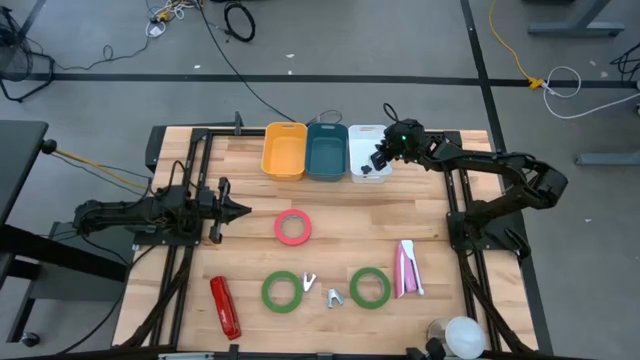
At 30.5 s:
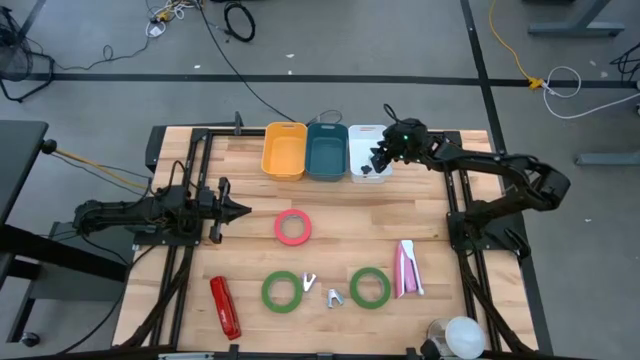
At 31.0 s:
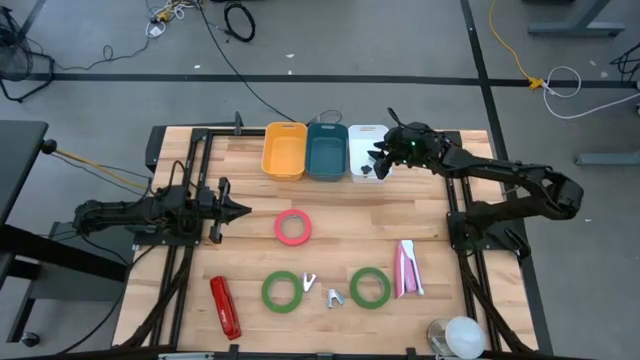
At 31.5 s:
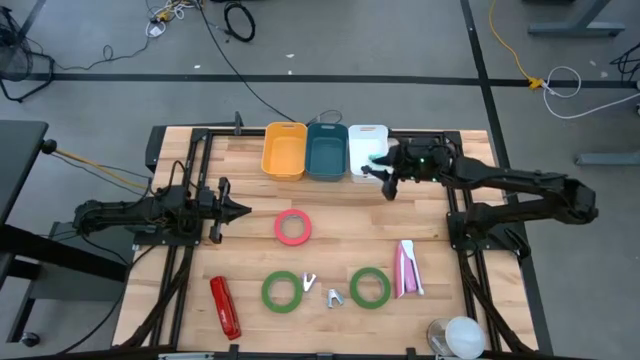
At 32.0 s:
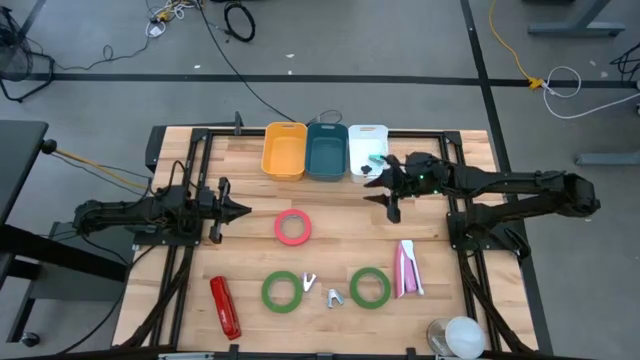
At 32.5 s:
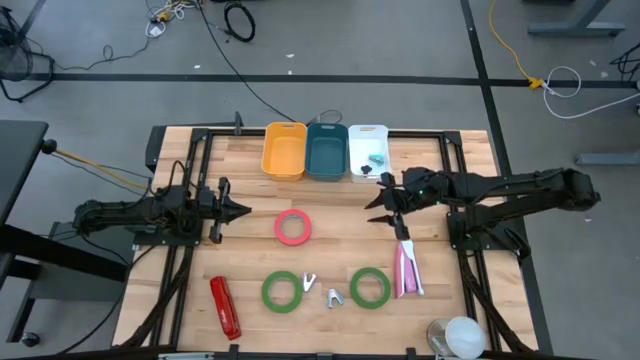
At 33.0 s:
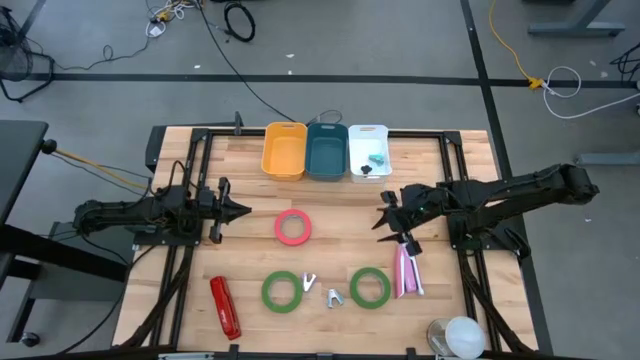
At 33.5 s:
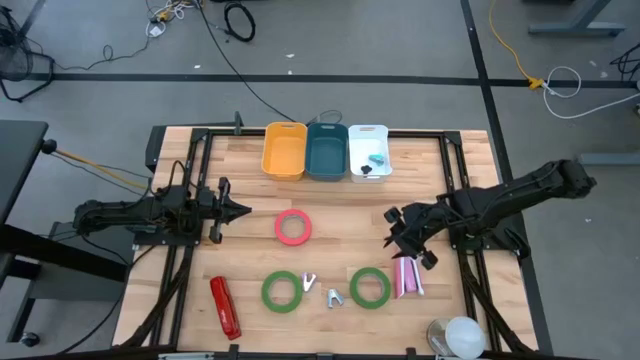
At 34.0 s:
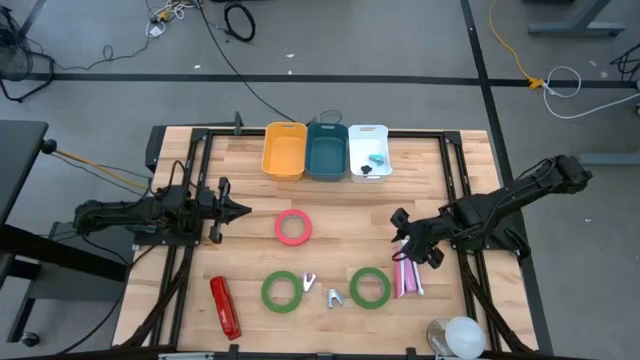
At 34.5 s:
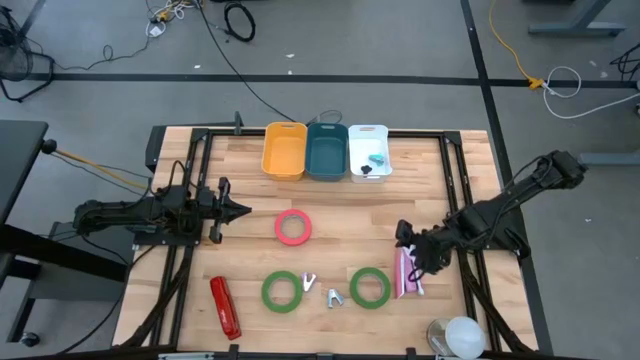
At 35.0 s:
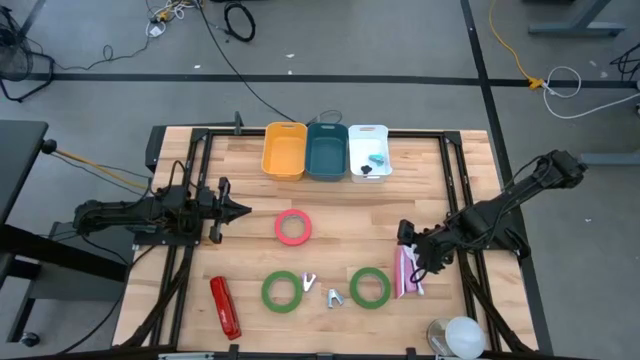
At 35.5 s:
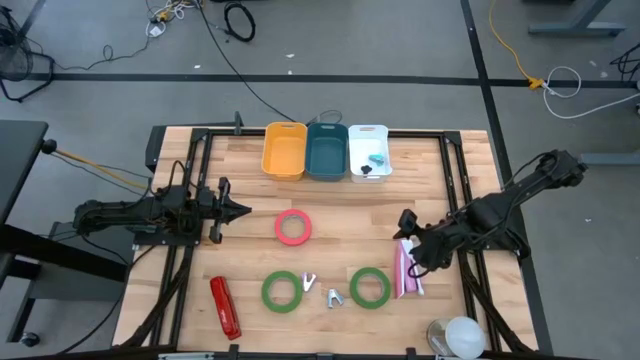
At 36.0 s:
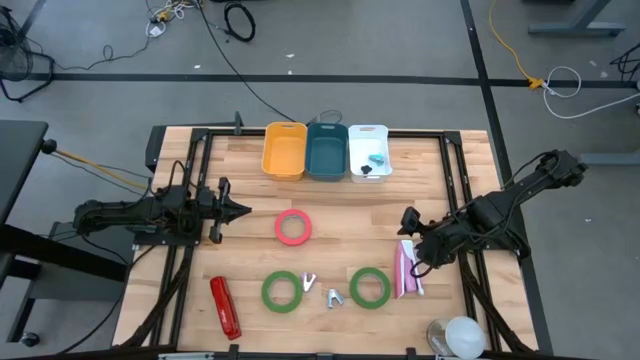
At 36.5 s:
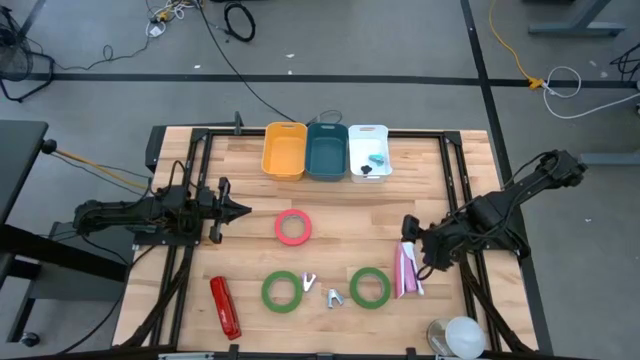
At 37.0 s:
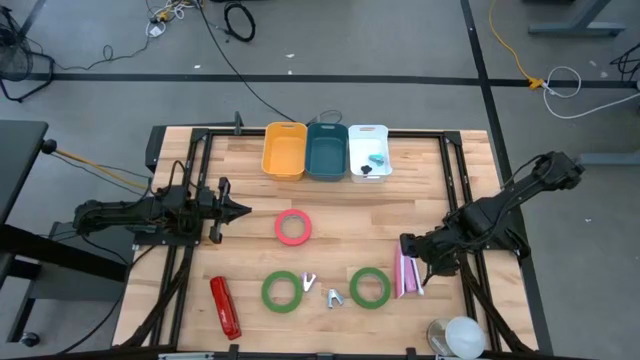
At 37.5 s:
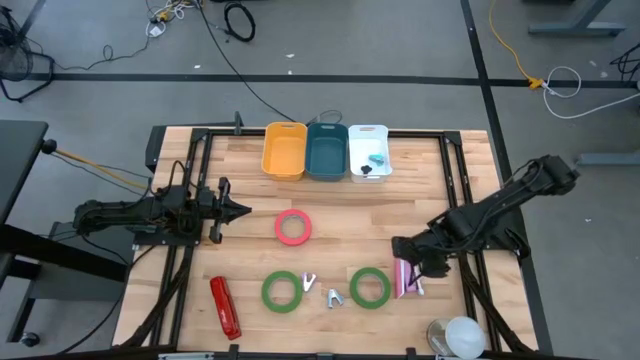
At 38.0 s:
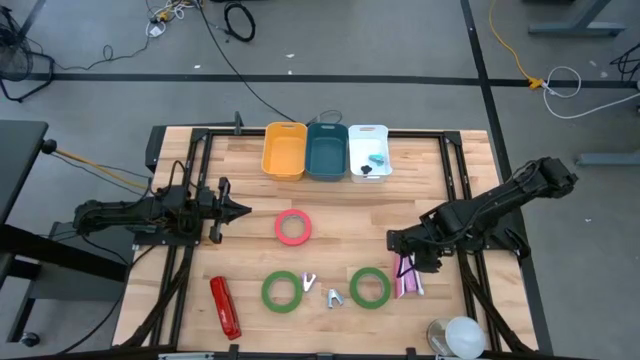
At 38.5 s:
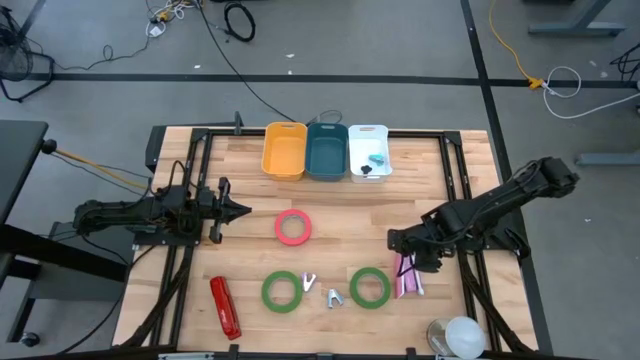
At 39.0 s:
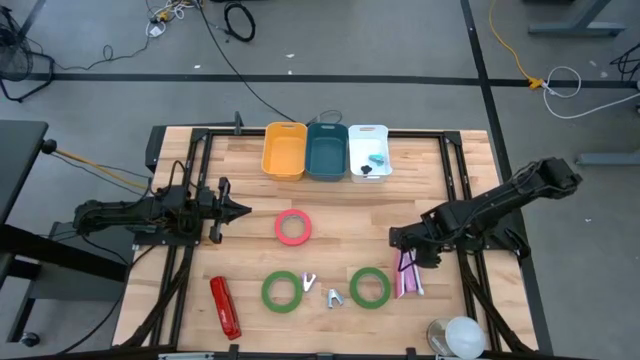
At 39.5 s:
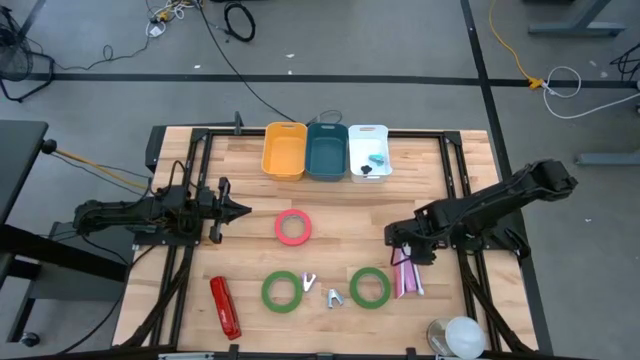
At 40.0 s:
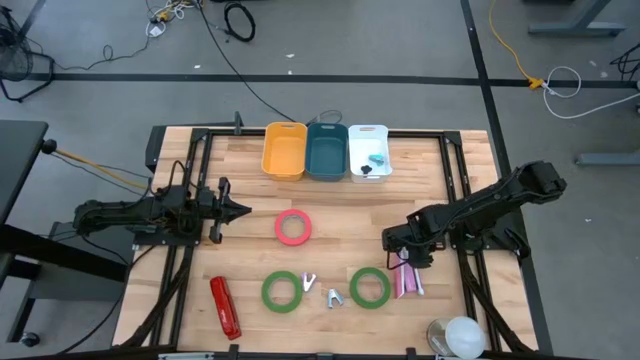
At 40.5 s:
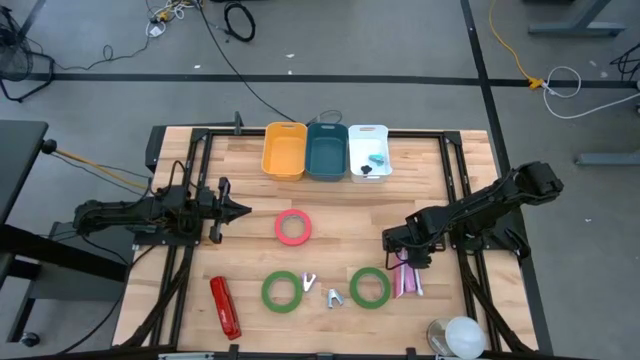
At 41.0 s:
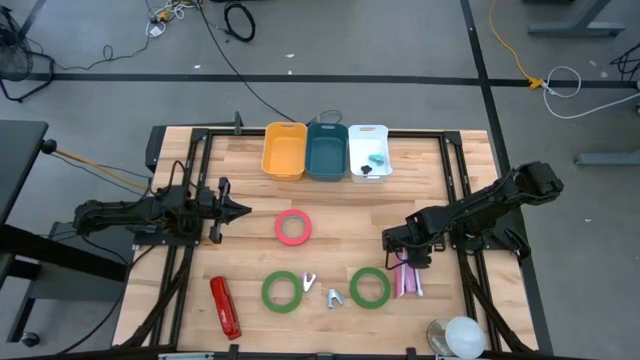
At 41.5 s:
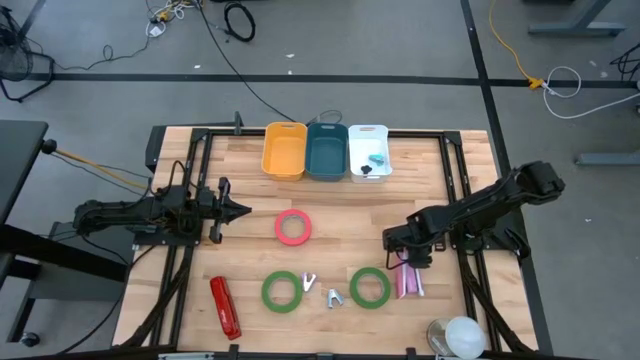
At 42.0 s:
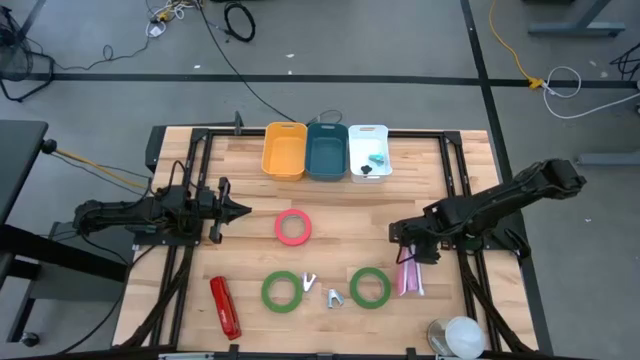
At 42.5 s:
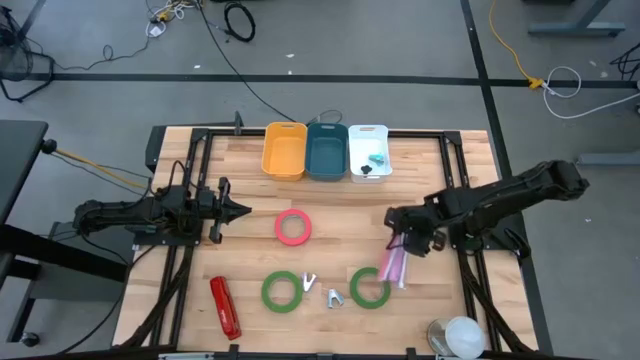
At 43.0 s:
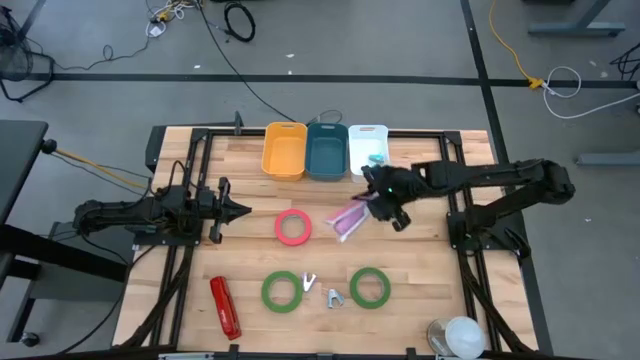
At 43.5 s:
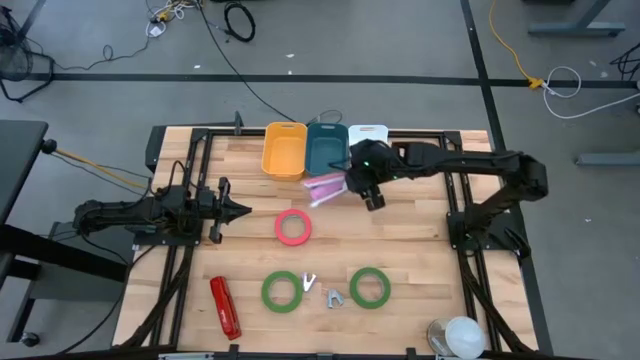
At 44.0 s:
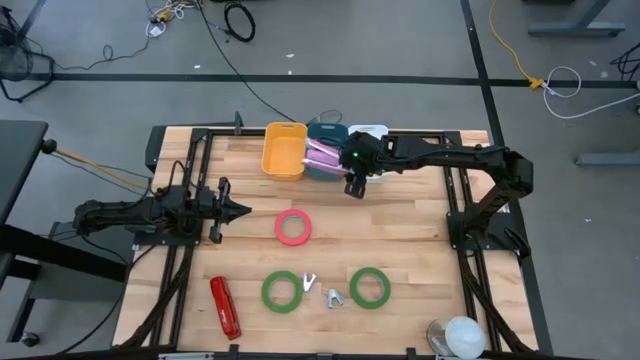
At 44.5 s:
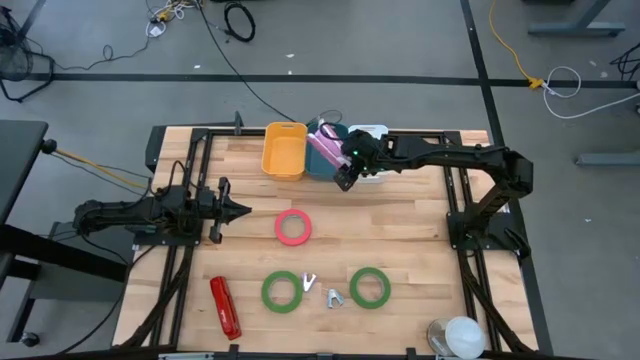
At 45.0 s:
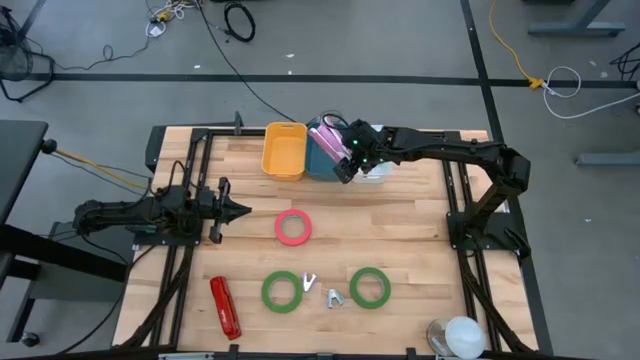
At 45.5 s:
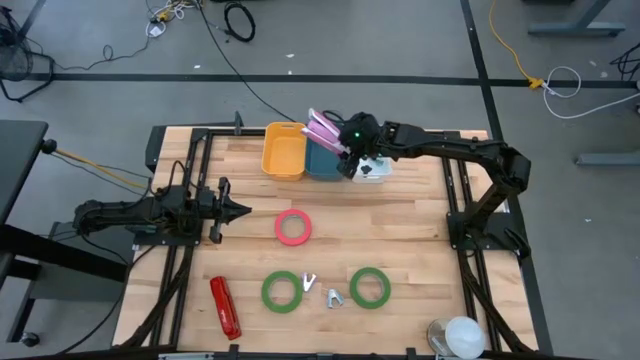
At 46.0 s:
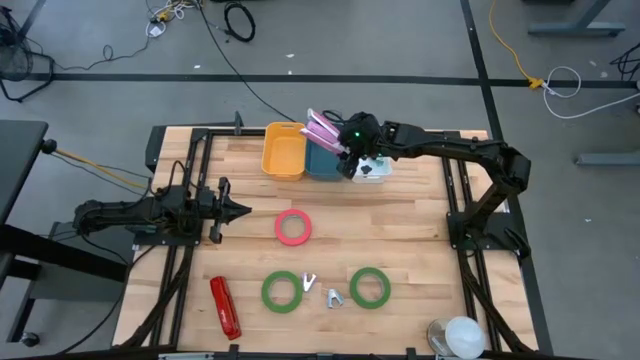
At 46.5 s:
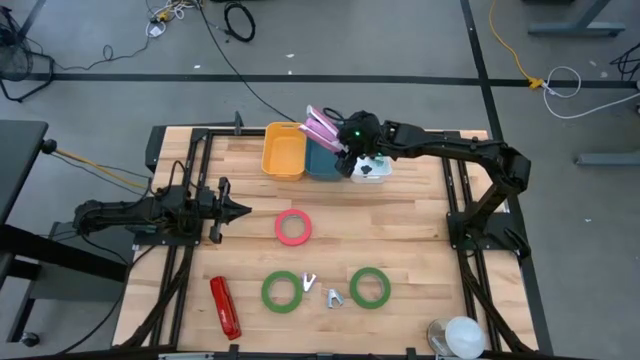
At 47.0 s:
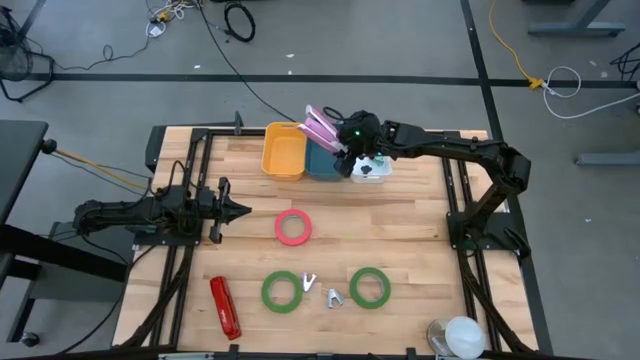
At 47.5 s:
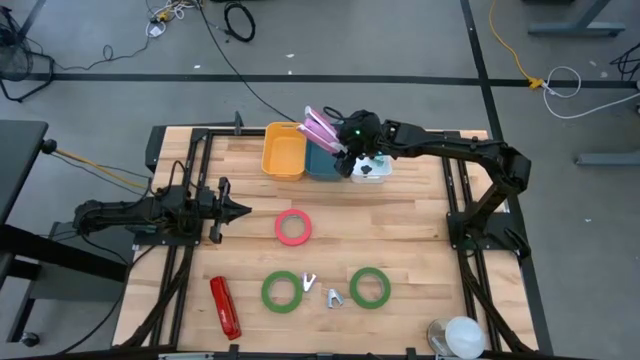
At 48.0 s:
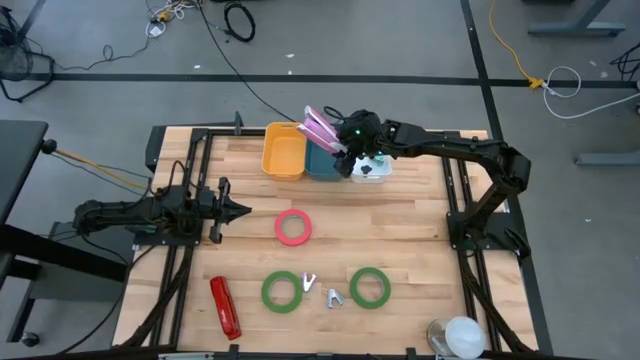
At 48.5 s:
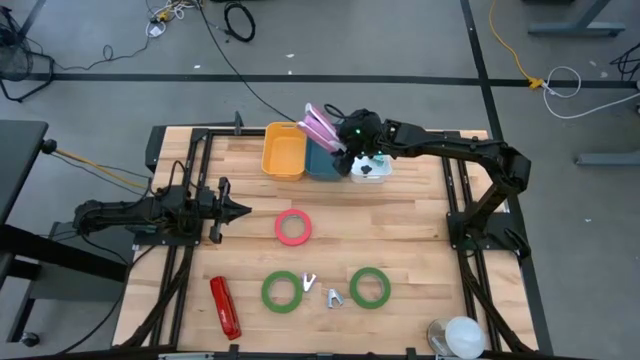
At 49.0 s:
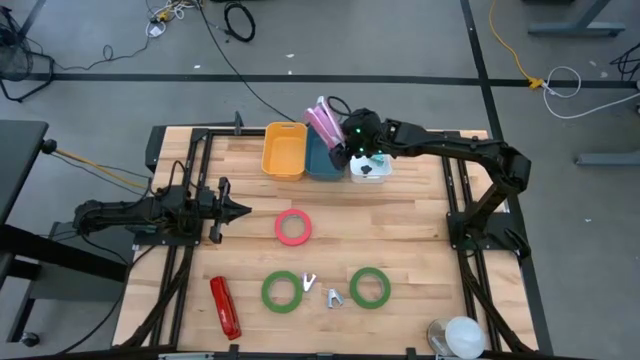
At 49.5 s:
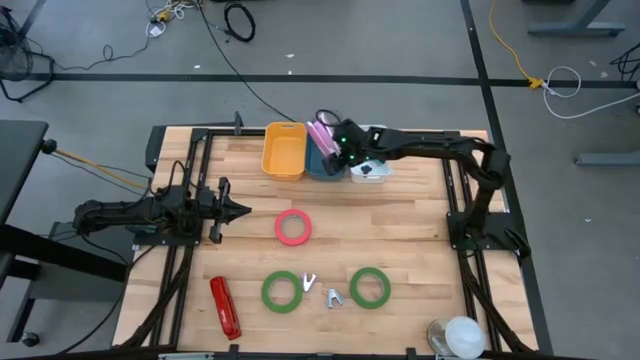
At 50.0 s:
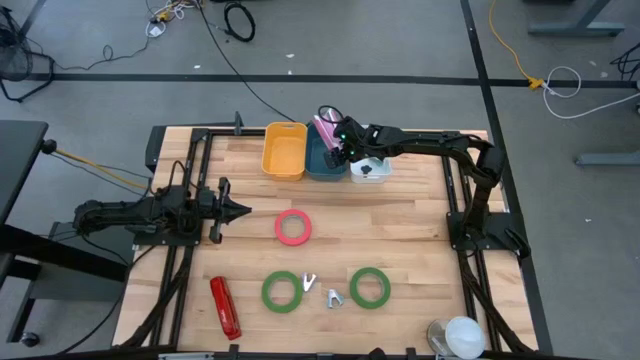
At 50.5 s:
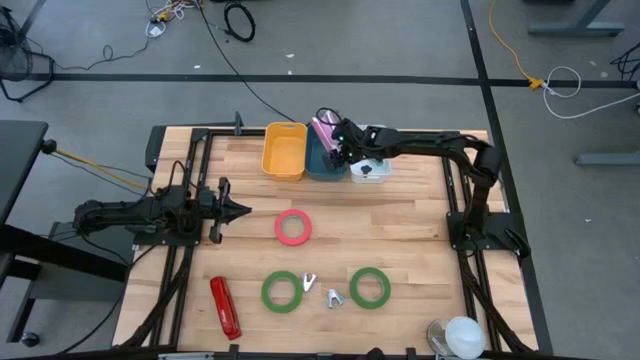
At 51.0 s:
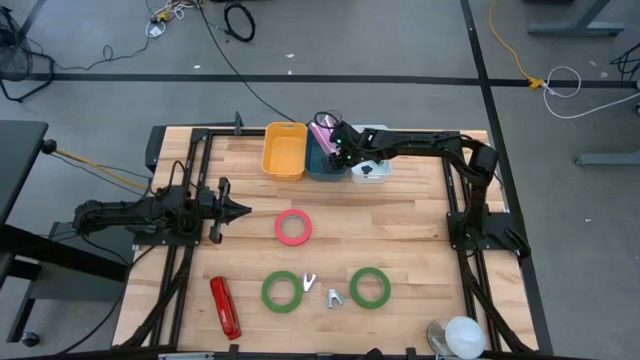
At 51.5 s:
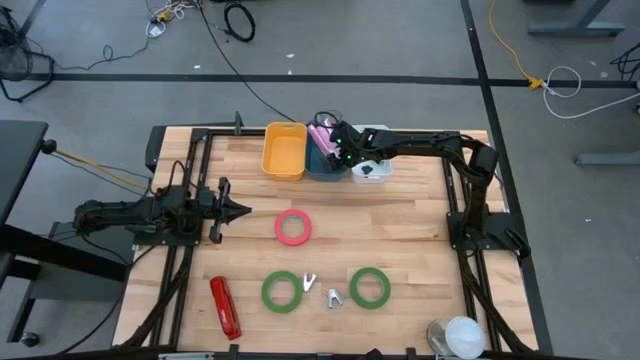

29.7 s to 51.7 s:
Task: Pick and place Stapler, Stapler remover, tape
Put the pink stapler into the dark blue bin
